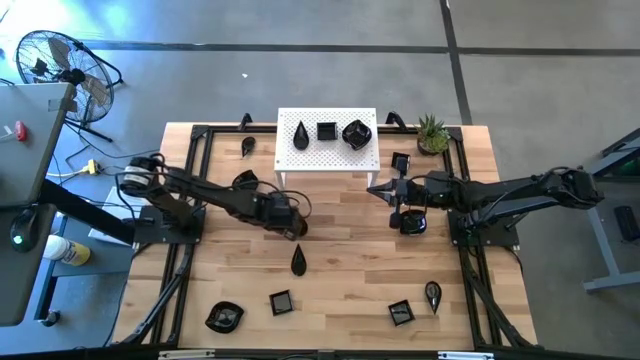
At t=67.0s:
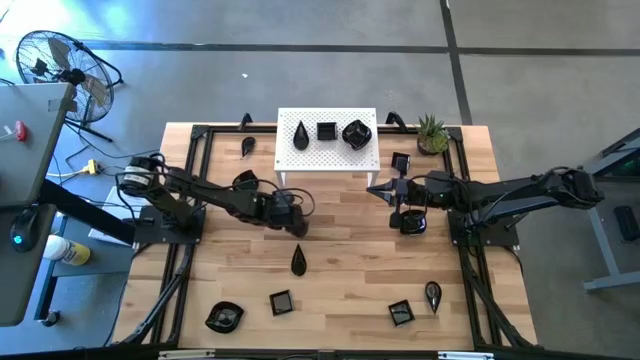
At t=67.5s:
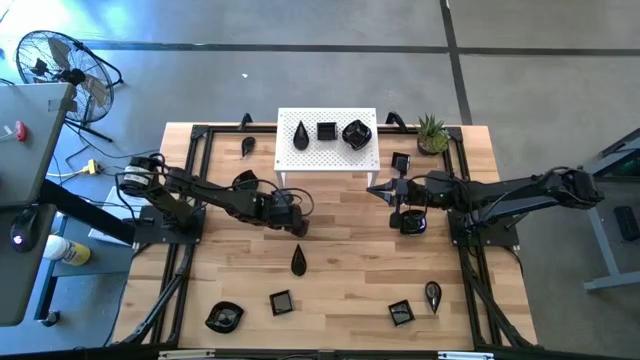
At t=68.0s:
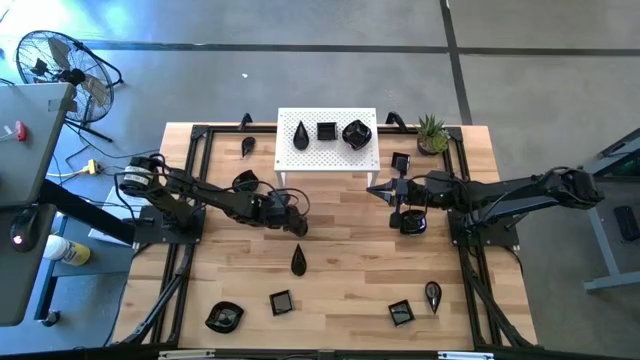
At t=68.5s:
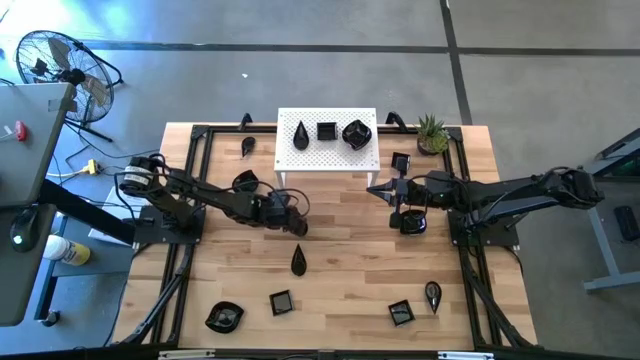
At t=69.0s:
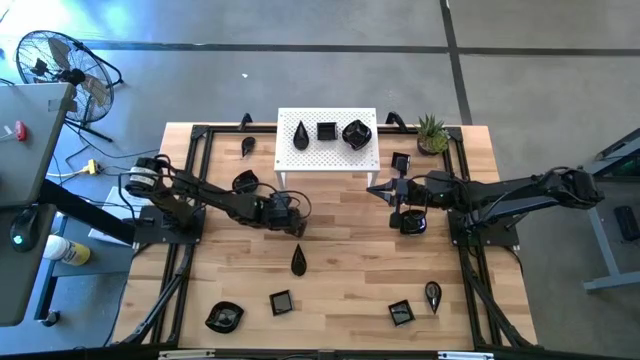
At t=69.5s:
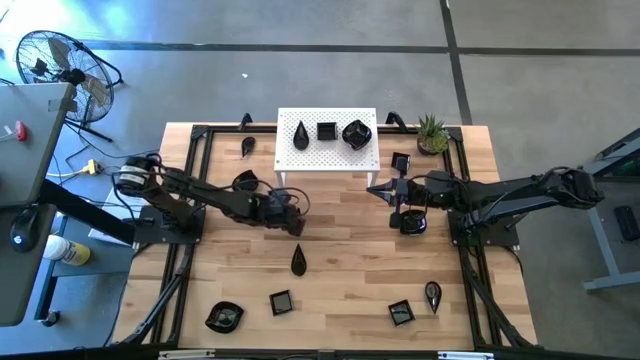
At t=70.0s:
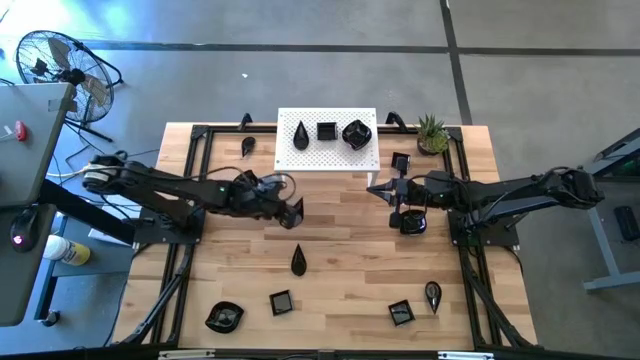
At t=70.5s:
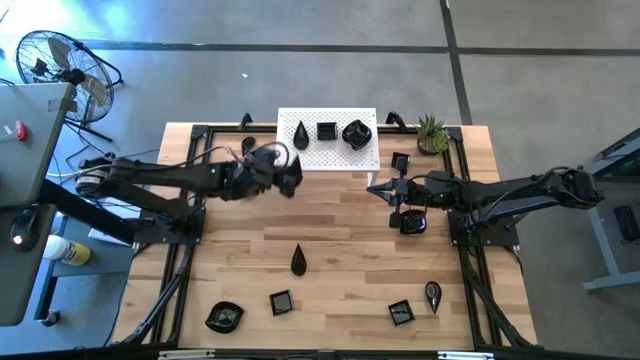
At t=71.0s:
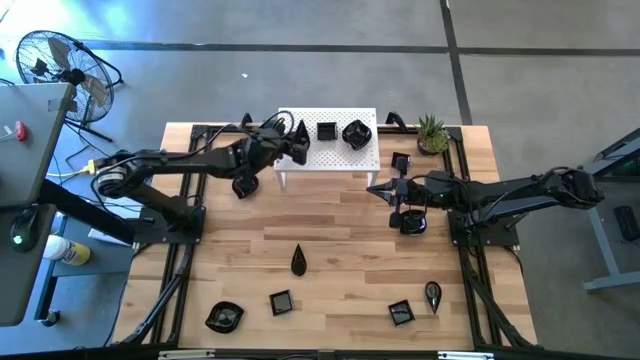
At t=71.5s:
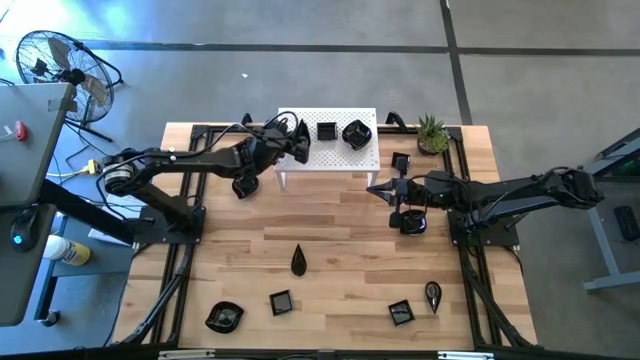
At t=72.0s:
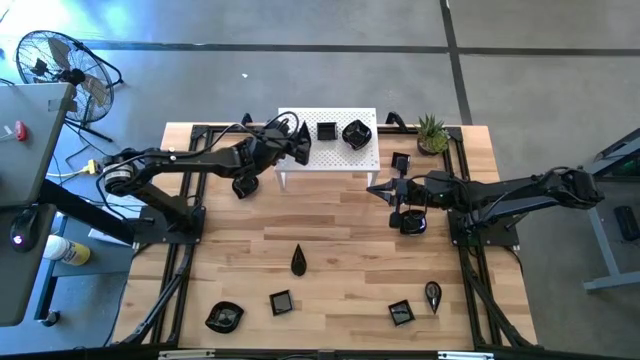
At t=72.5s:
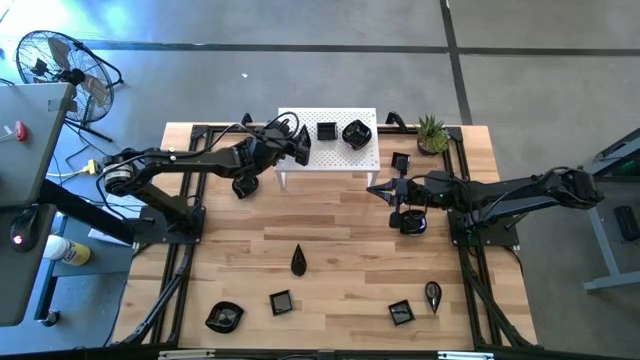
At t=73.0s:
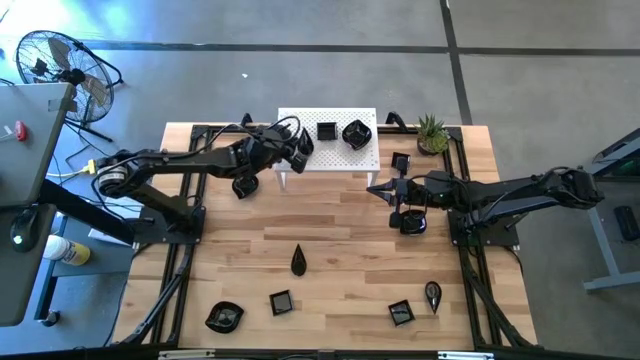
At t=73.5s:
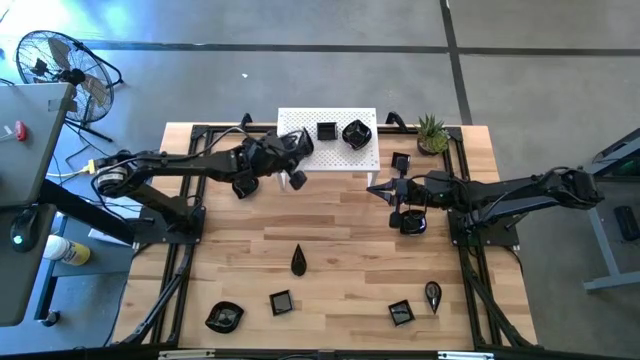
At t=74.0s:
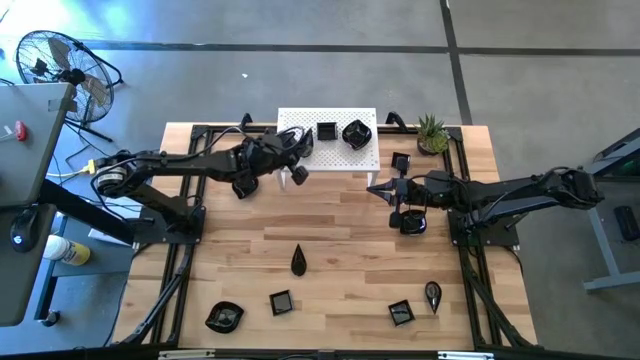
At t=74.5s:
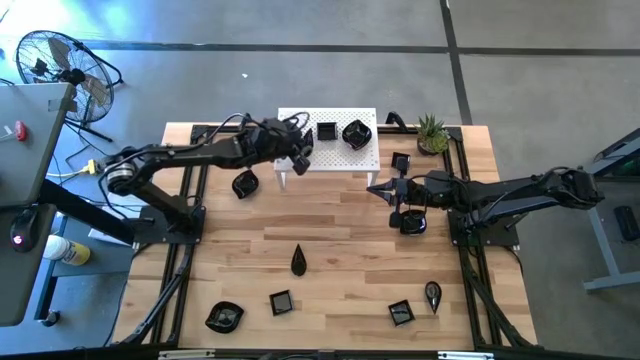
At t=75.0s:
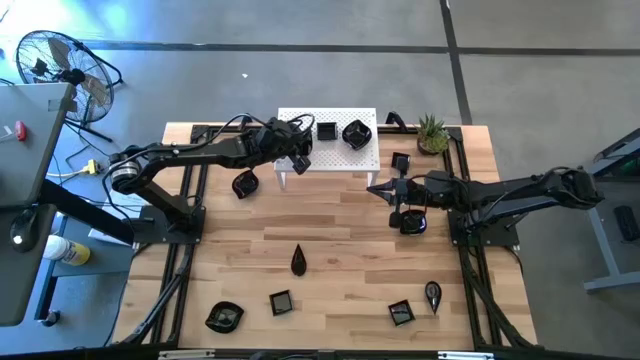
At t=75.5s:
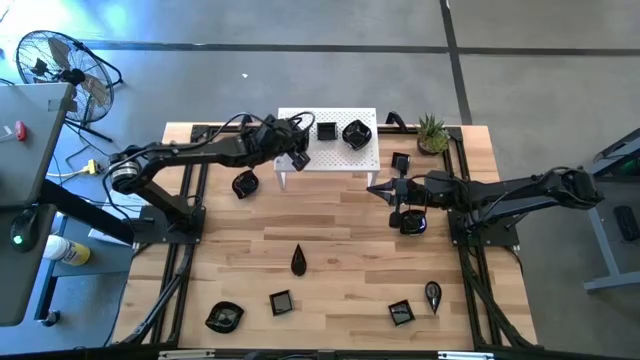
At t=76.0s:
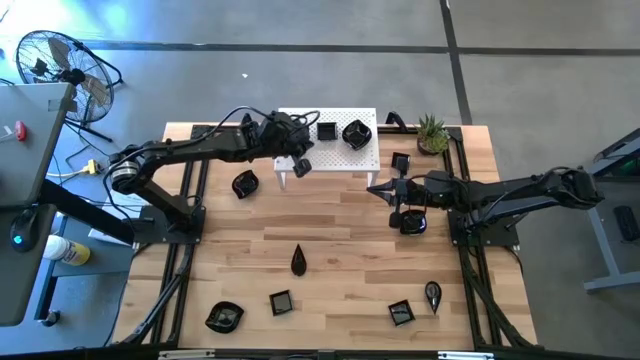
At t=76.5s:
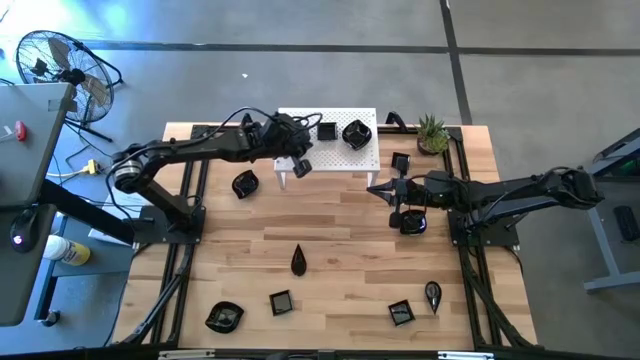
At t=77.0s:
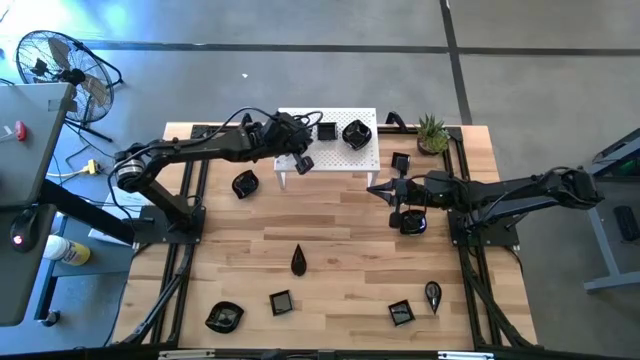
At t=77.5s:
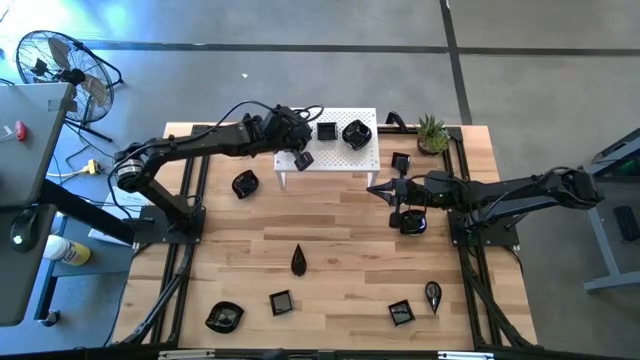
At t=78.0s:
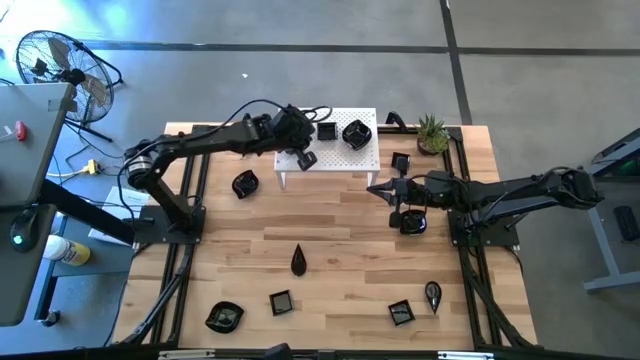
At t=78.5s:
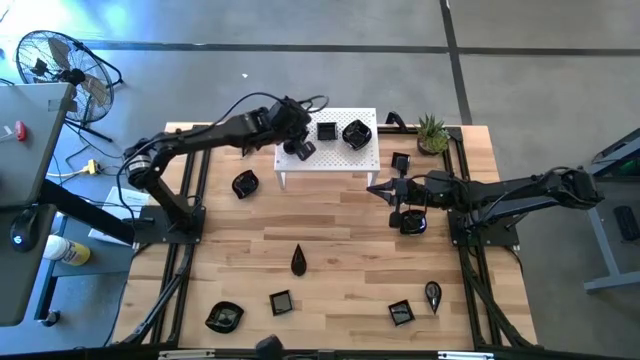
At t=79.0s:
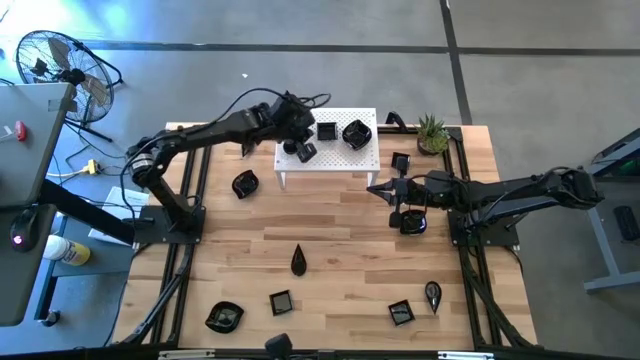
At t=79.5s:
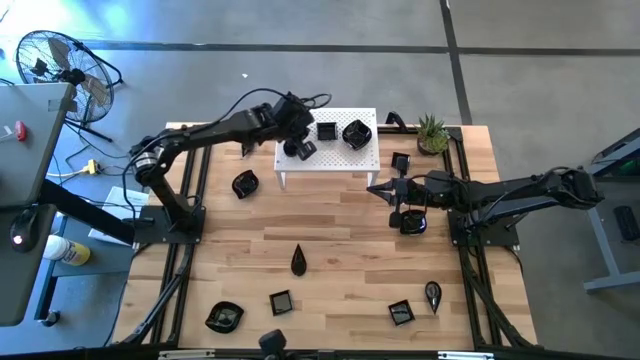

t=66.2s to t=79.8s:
Task: Pick & Place Mini shaped plates
Stack the drop shaped bowl on top of the drop shaped bowl on the shelf

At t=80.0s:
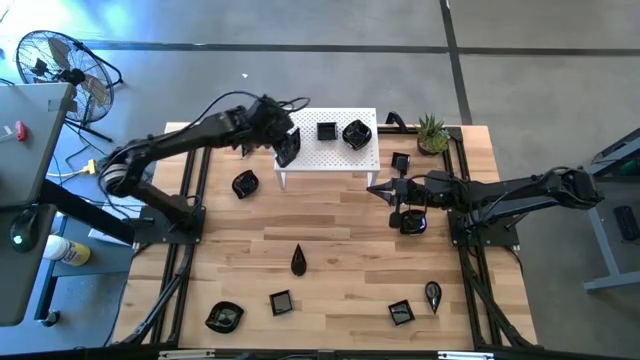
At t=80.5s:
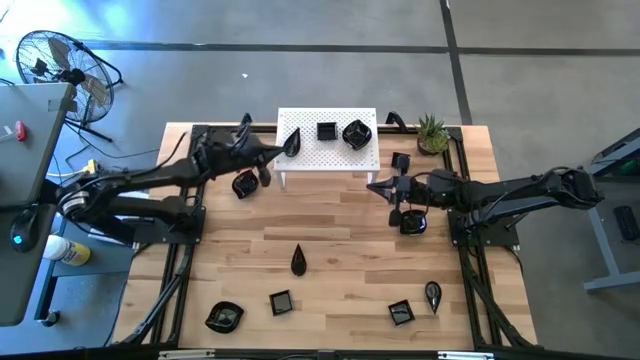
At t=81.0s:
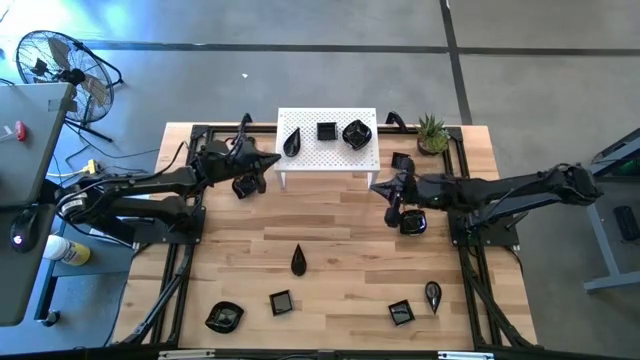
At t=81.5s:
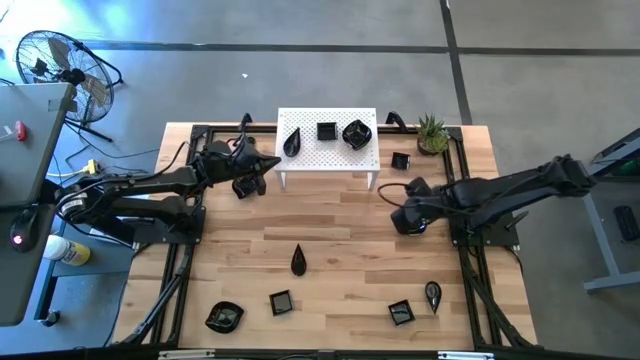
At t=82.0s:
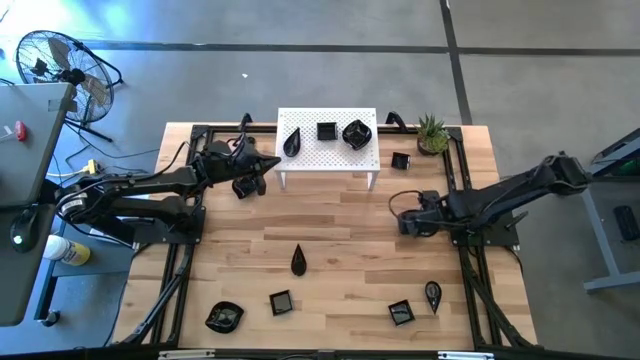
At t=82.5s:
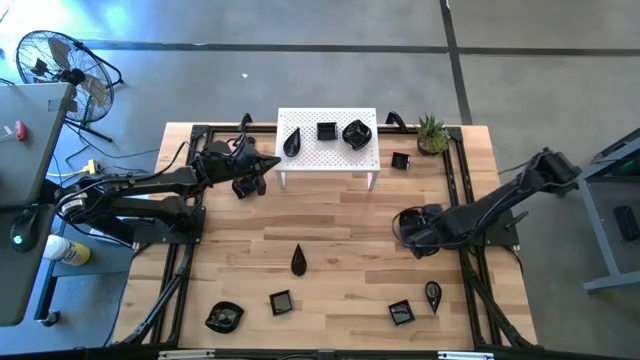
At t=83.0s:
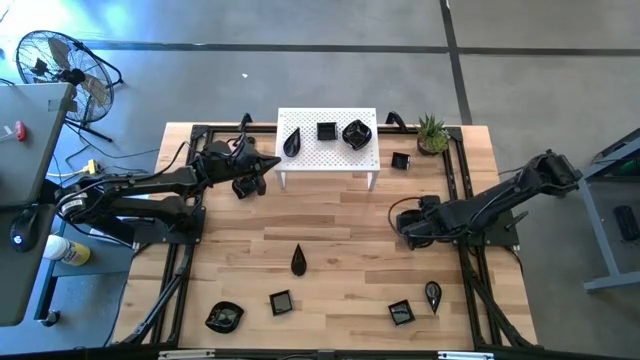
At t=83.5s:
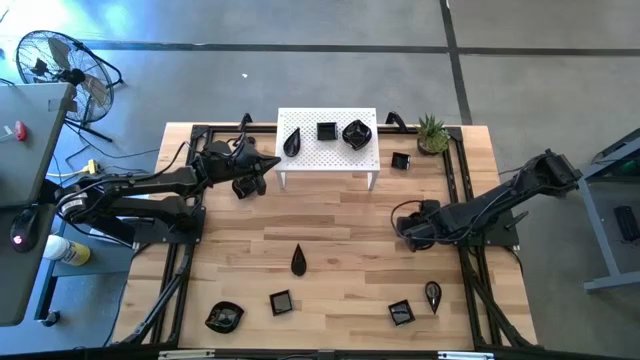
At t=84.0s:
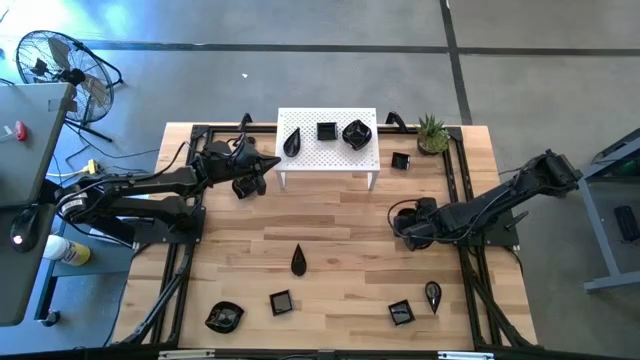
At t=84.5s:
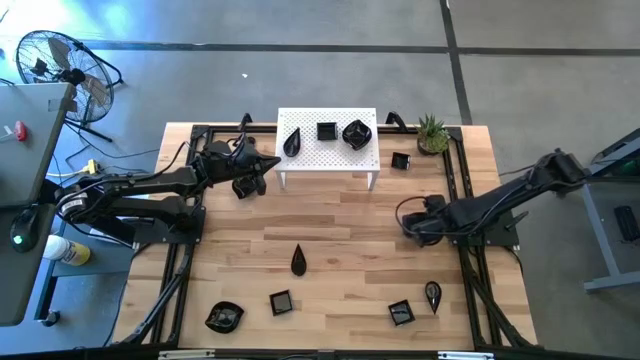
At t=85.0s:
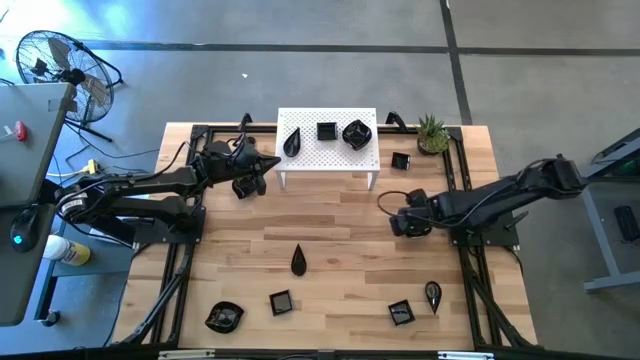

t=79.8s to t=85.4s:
Stack the leaf shaped bowl on top of the leaf shaped bowls on the shelf

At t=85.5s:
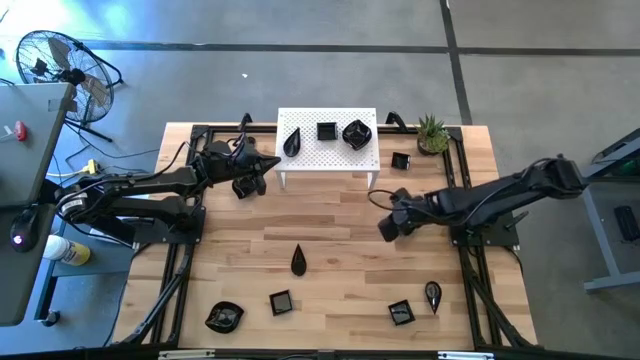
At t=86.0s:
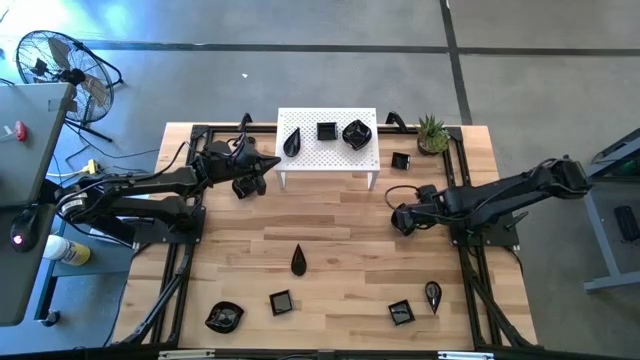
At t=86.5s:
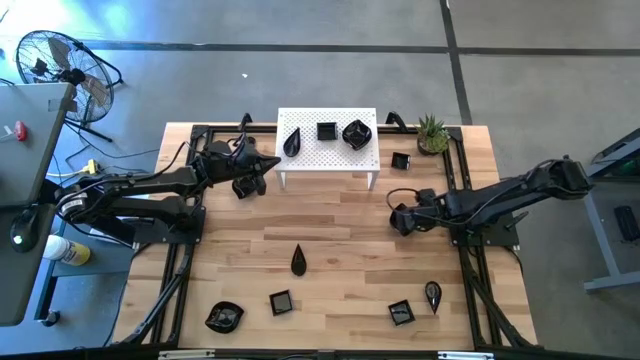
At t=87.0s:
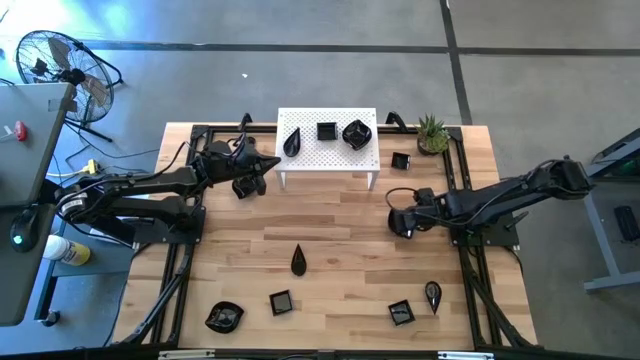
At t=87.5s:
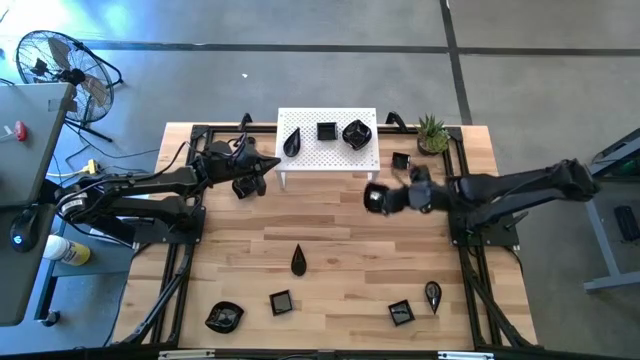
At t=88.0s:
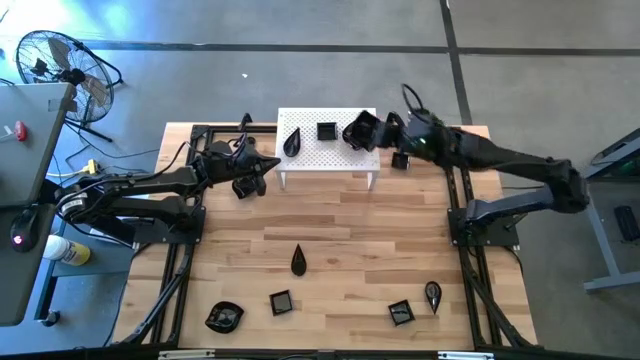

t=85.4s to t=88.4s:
Stack the leaf shaped bowl on top of the leaf shaped bowls on the shelf
